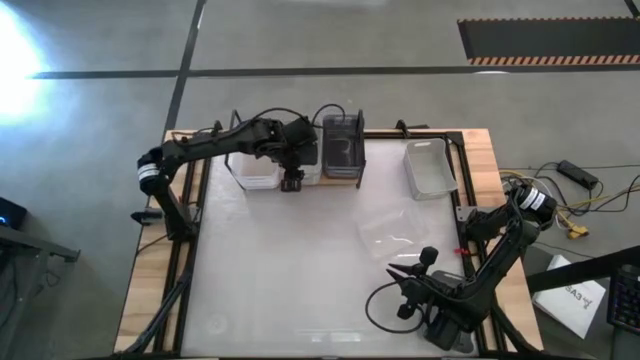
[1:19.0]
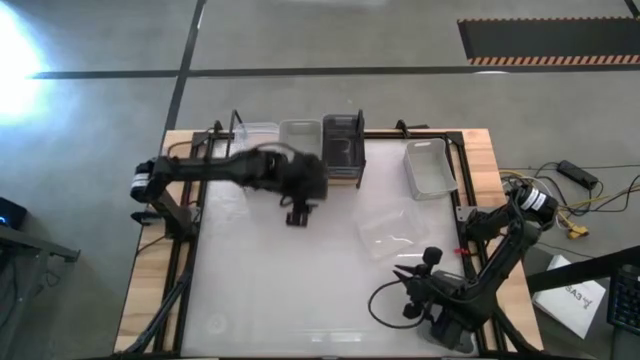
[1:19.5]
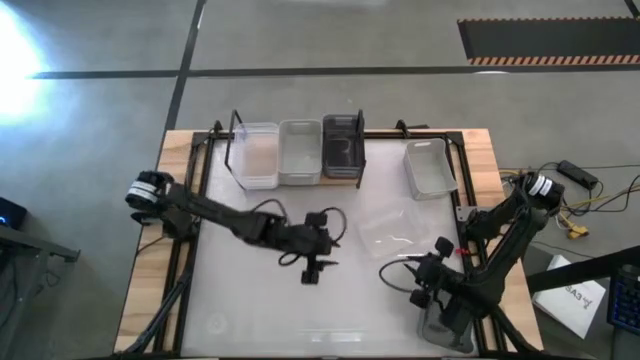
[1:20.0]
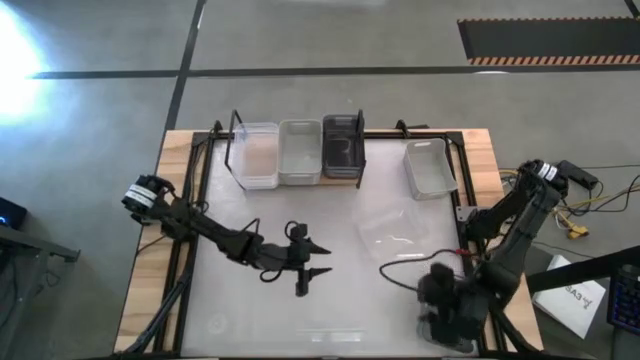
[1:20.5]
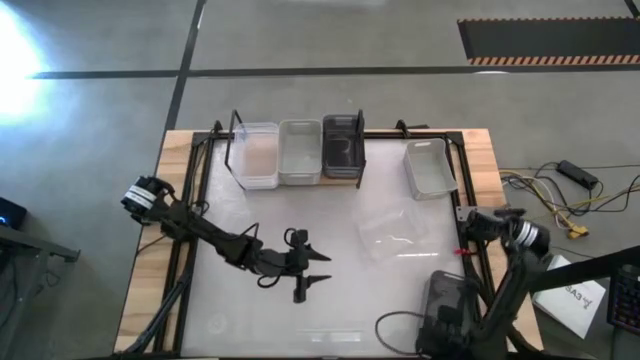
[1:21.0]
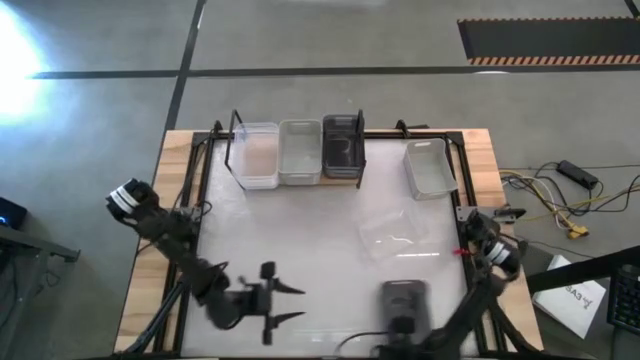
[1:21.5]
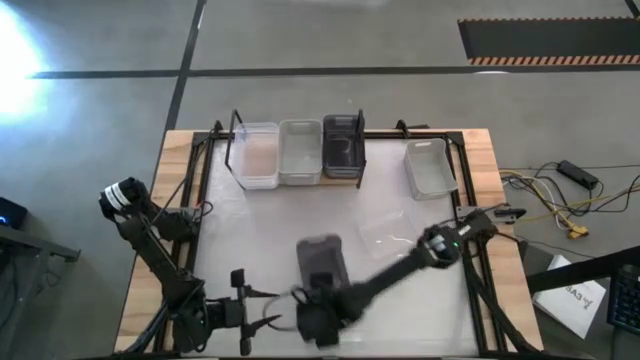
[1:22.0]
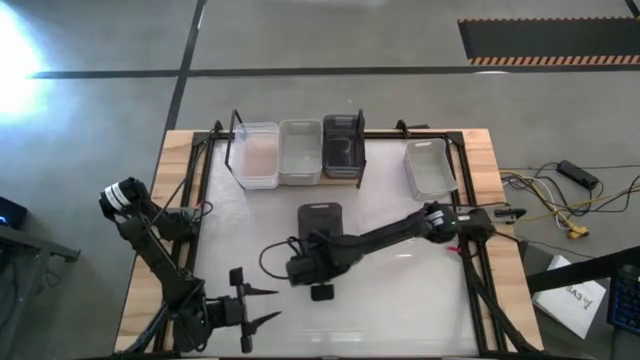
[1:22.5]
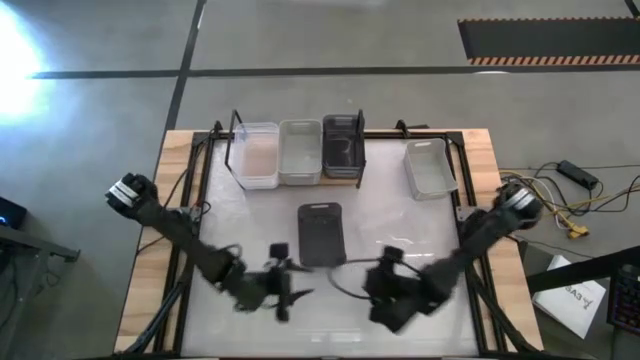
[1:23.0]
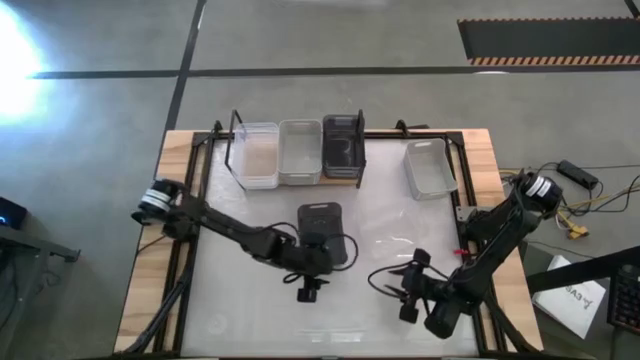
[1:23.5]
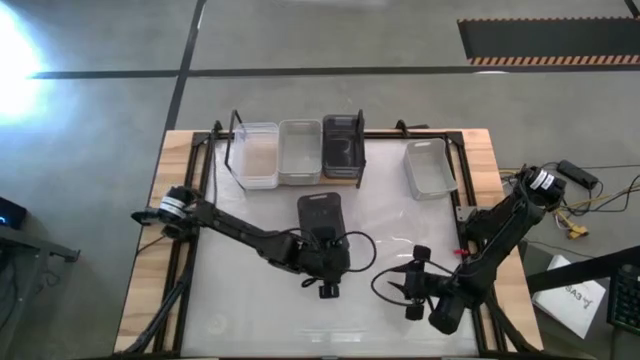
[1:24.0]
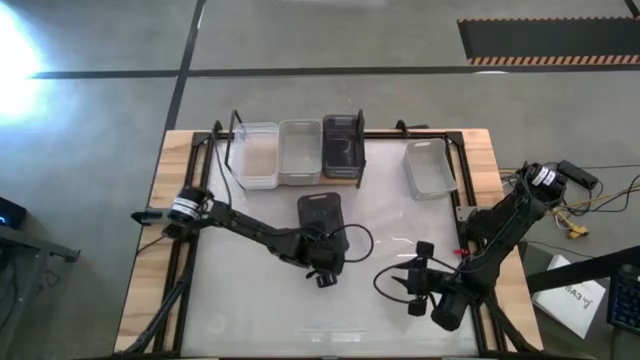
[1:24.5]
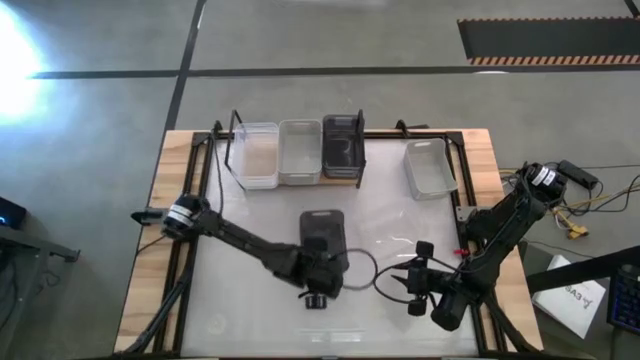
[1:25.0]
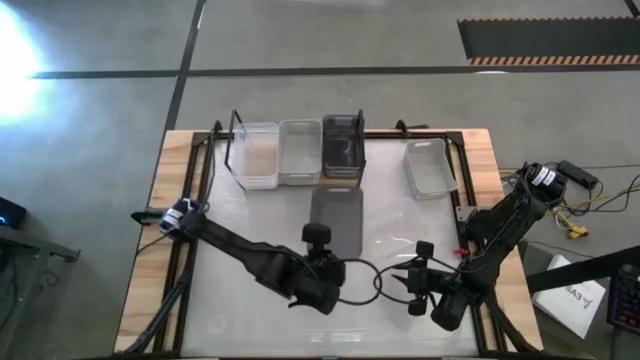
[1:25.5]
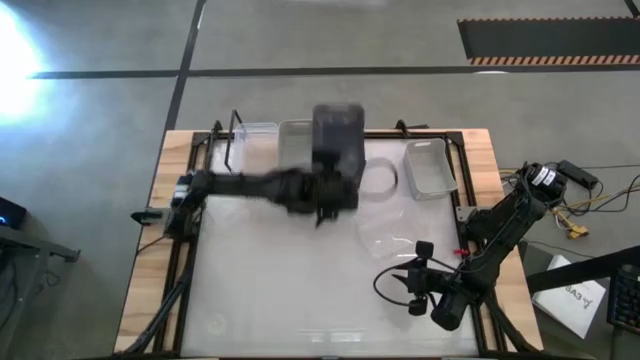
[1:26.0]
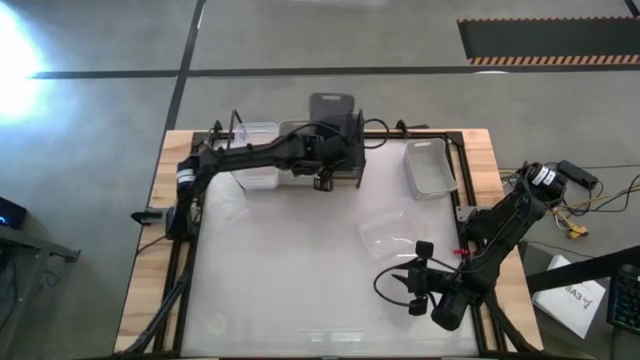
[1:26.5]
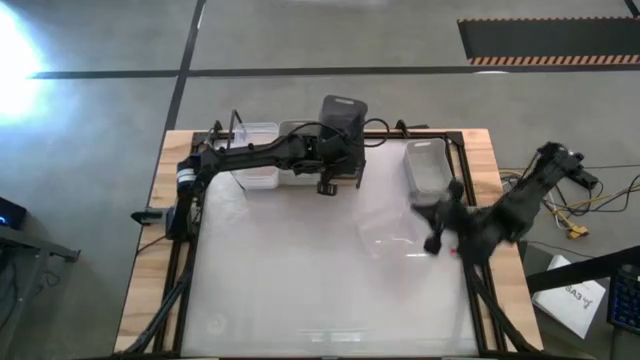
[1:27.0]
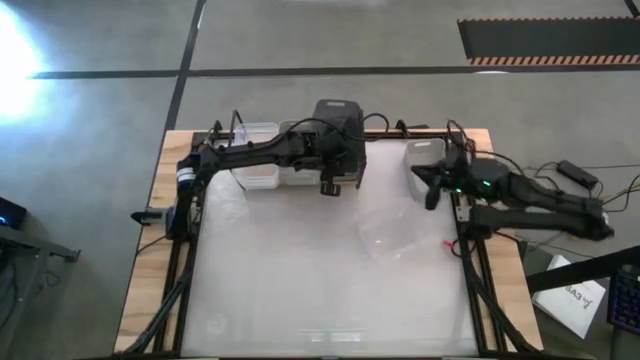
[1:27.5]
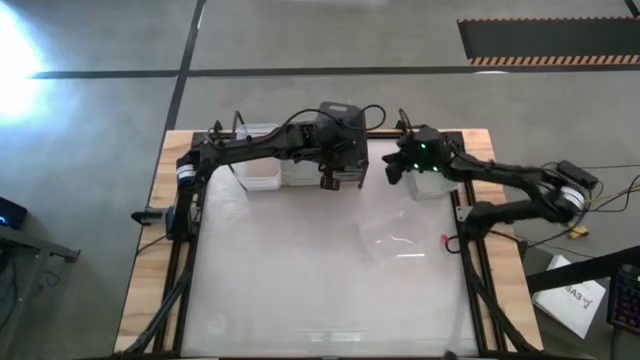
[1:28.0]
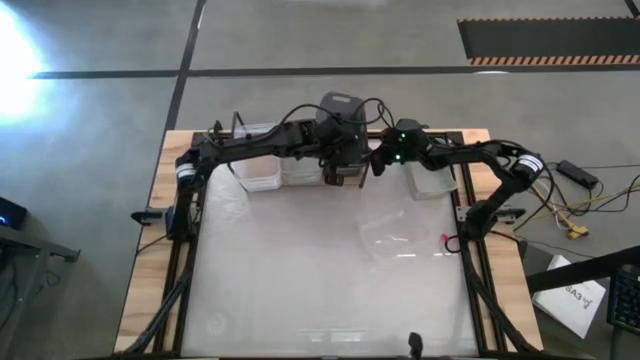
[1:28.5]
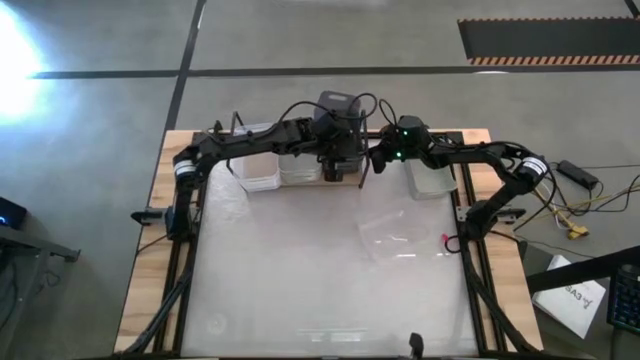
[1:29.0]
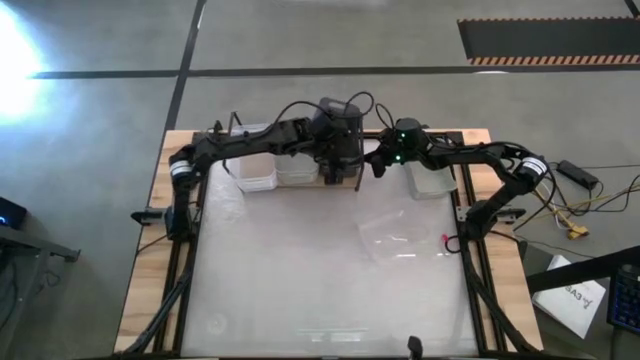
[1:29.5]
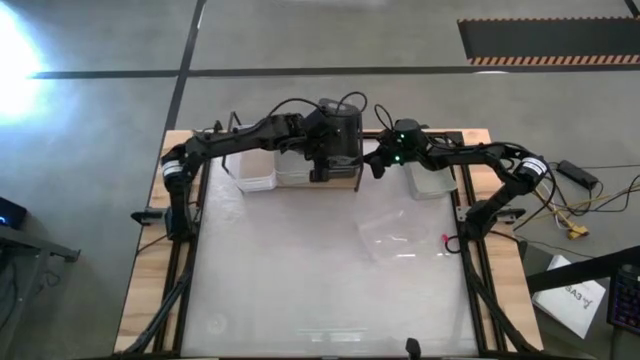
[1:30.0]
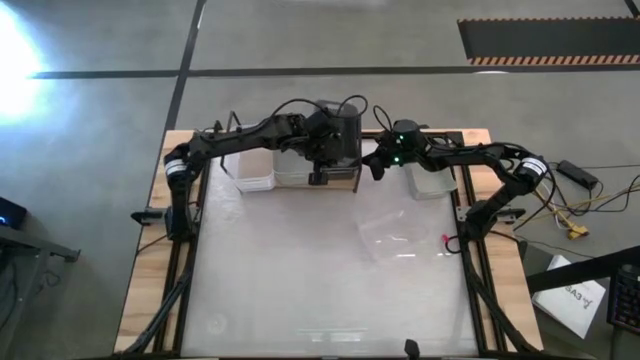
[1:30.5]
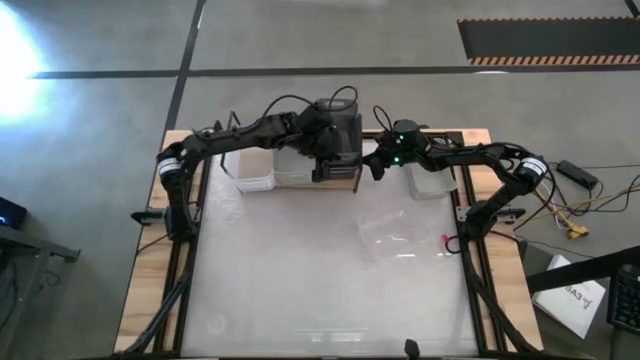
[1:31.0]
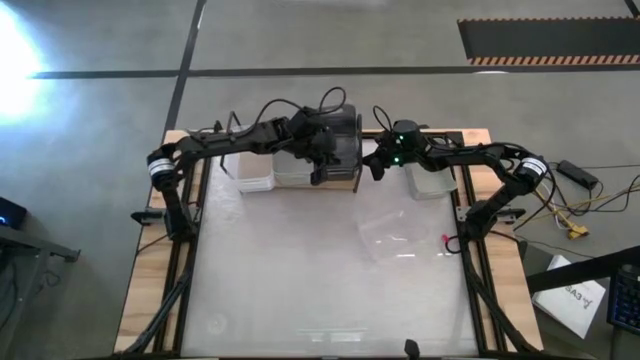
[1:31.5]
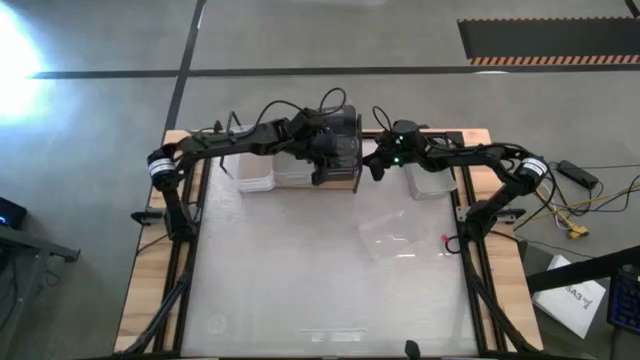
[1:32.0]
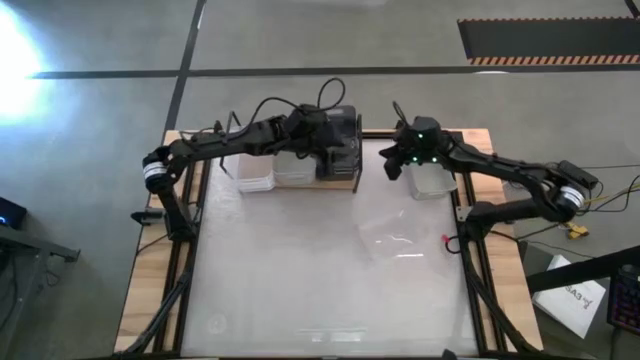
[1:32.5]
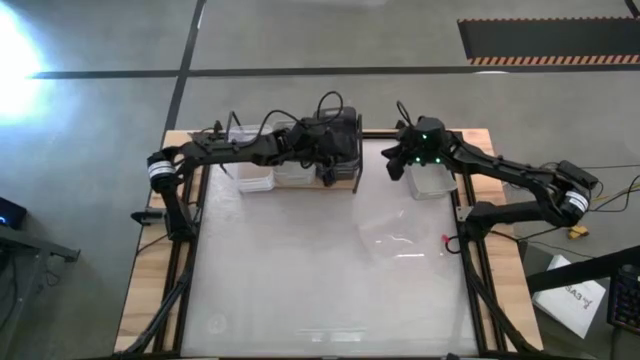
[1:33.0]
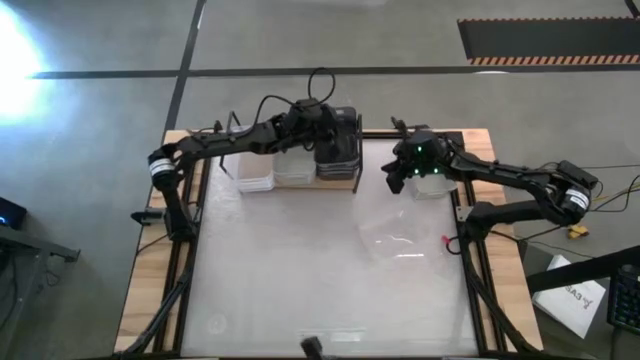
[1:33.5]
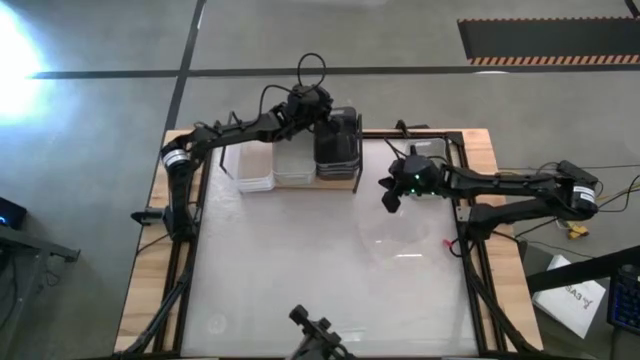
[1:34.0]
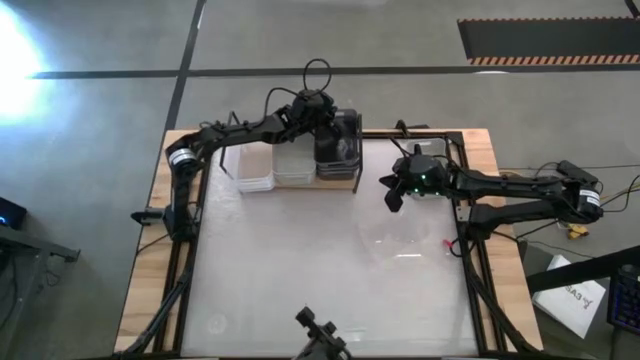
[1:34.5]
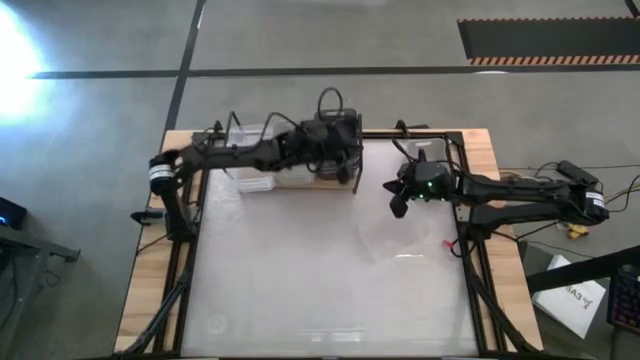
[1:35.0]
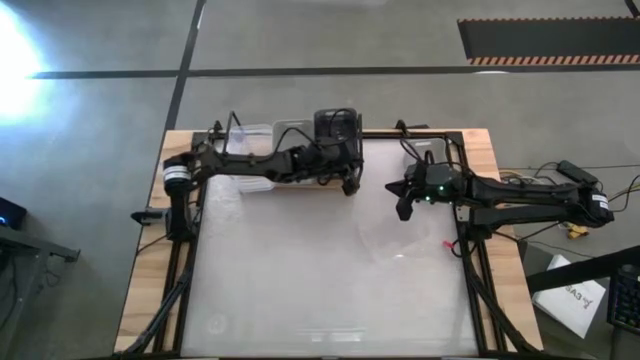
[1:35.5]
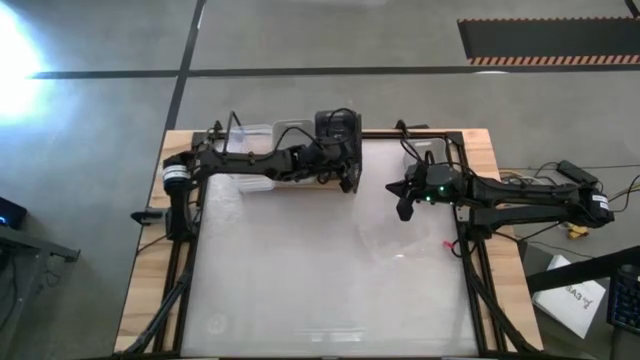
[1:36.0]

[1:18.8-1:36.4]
Task: Stack baskets on shelf by color
Stack the black bin on top of the black bin on the shelf

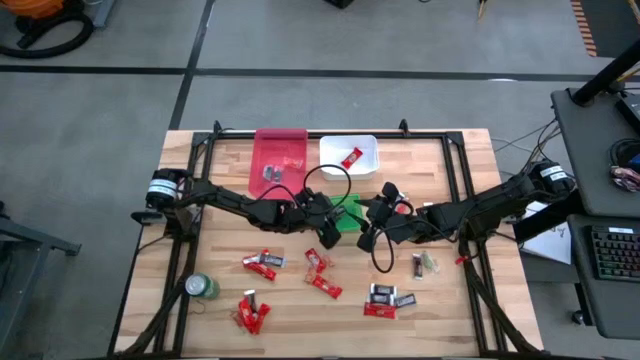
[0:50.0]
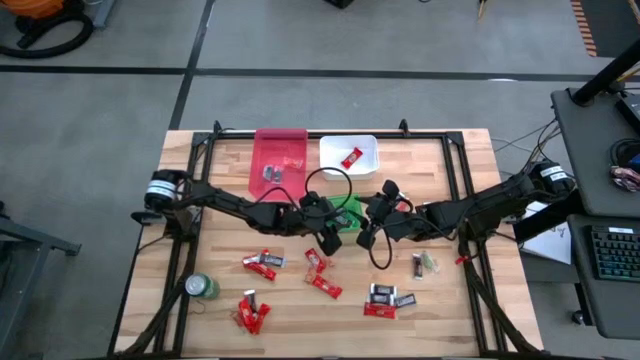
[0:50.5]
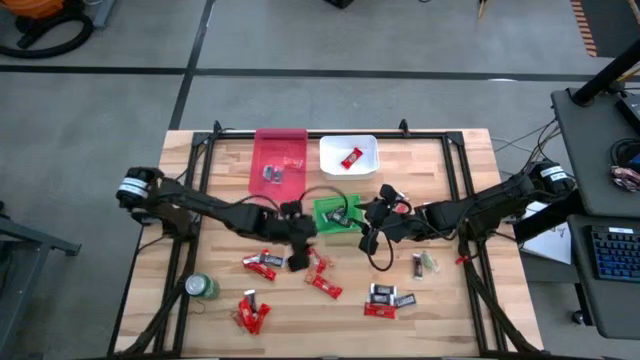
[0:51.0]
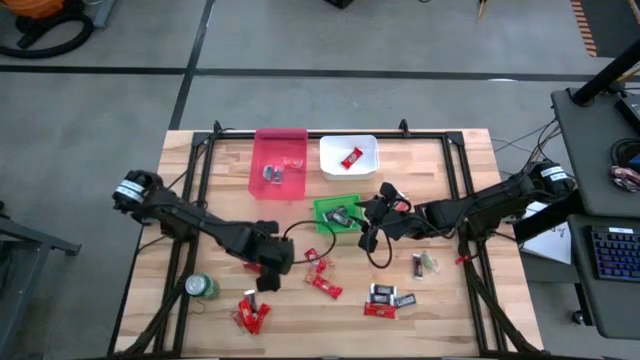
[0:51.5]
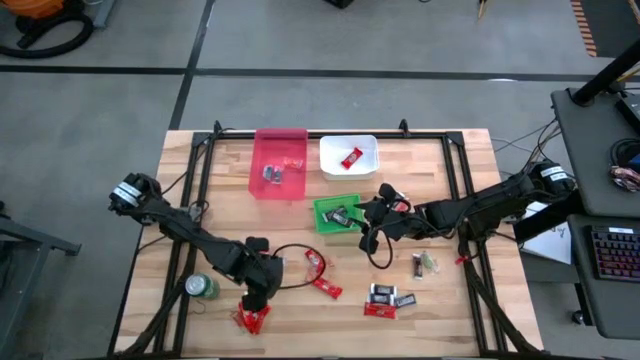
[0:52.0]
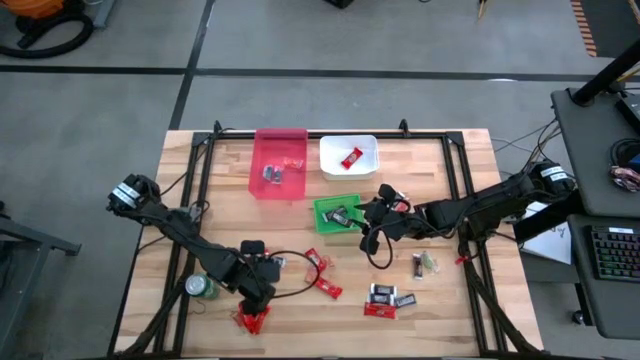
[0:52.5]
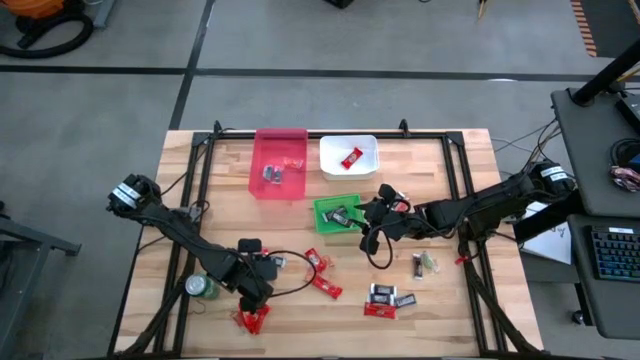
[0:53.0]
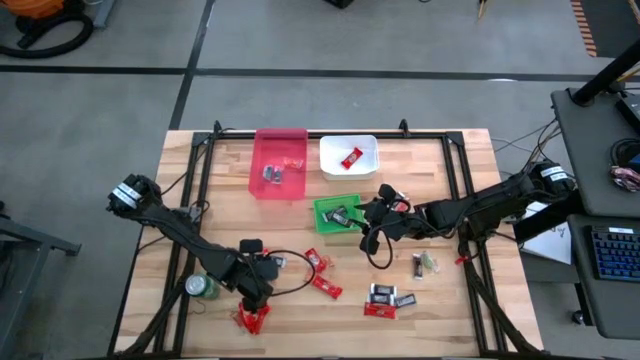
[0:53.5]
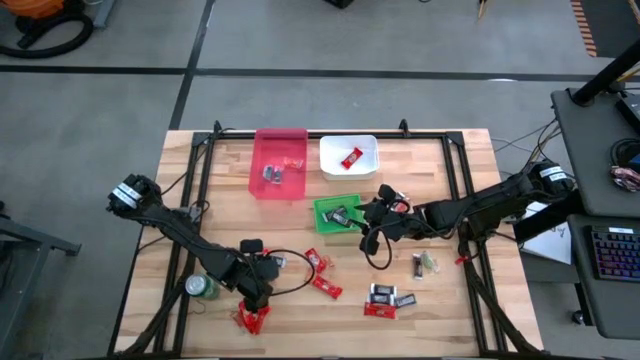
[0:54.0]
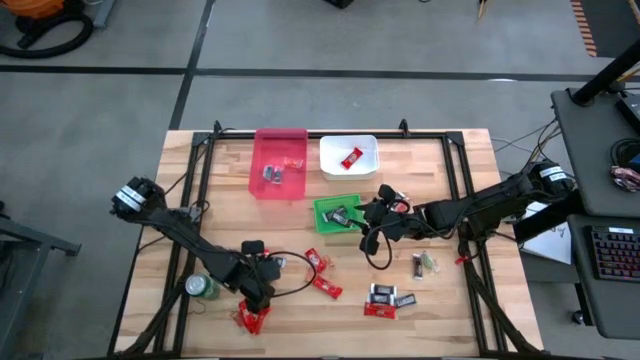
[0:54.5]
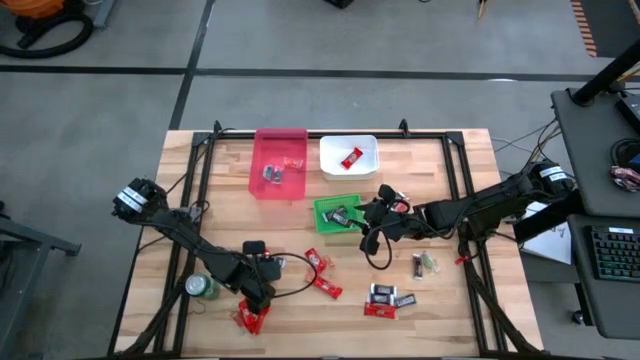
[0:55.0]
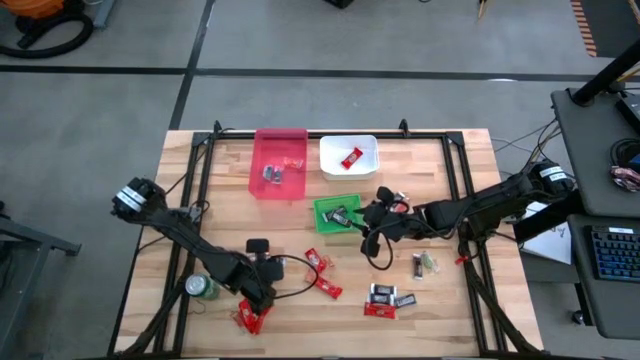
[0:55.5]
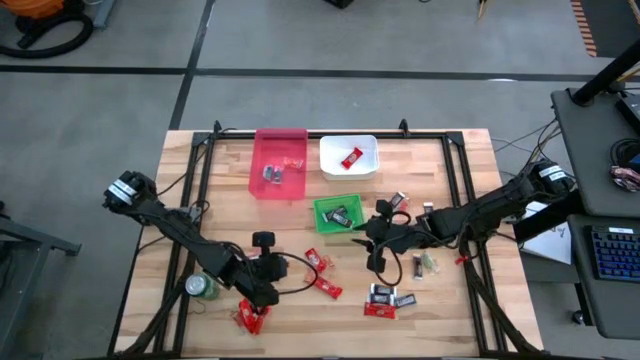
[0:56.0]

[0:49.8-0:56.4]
Task: Sort candy
Put the red chocolate bar into the white bin
